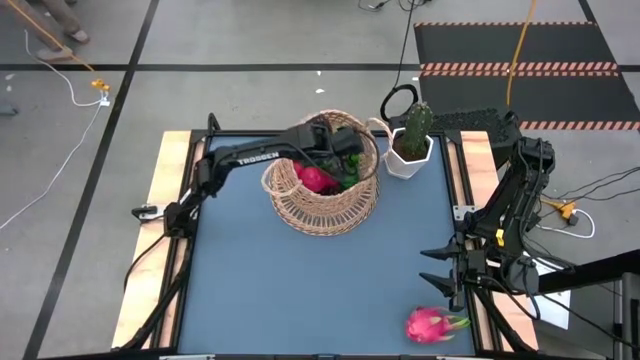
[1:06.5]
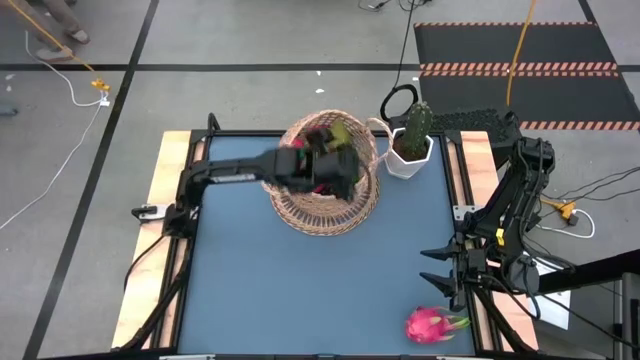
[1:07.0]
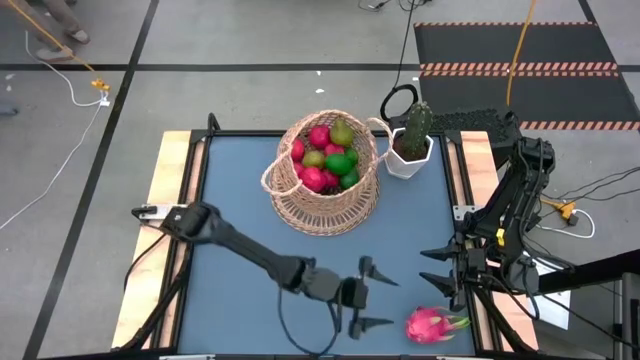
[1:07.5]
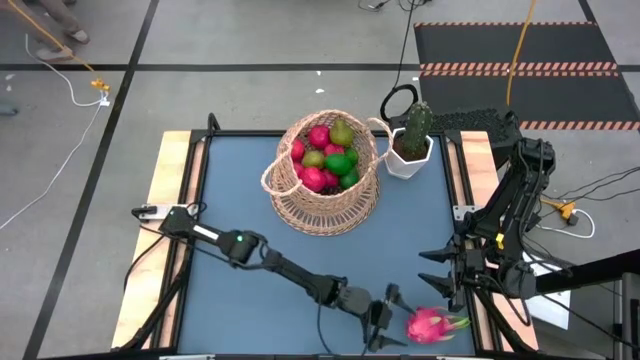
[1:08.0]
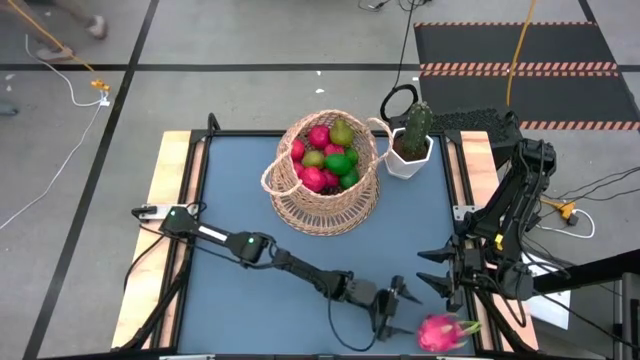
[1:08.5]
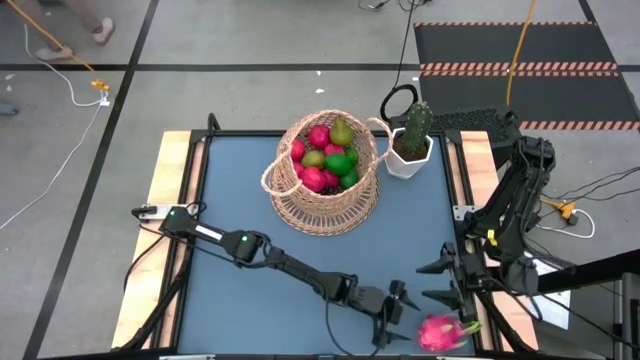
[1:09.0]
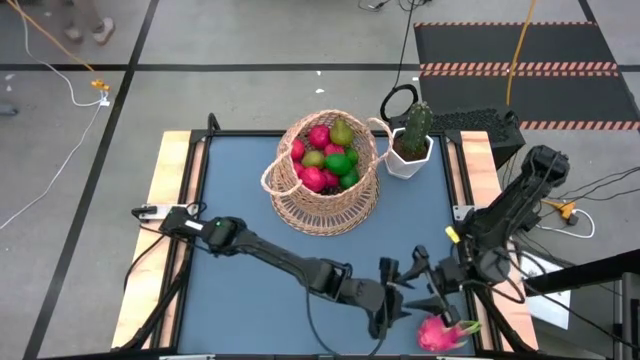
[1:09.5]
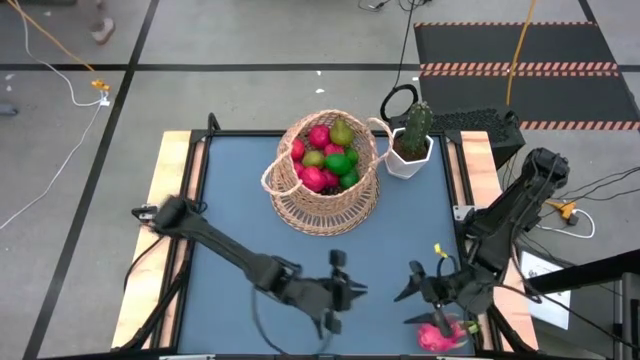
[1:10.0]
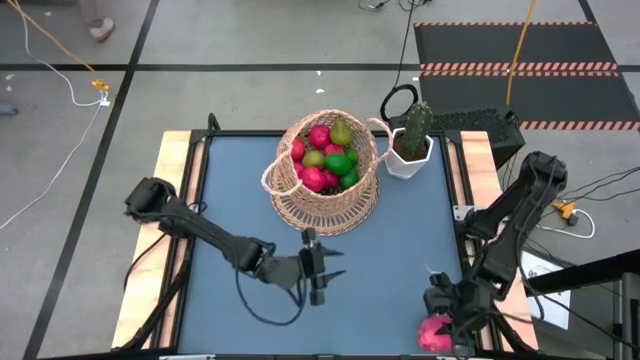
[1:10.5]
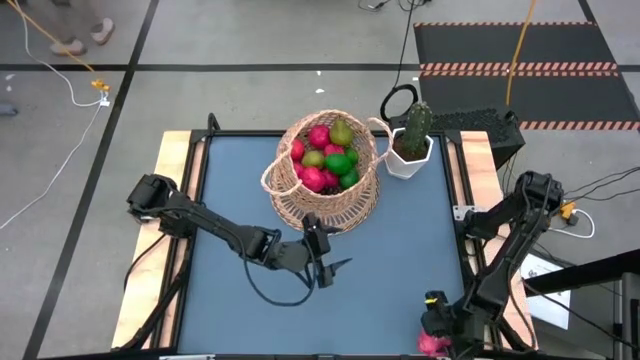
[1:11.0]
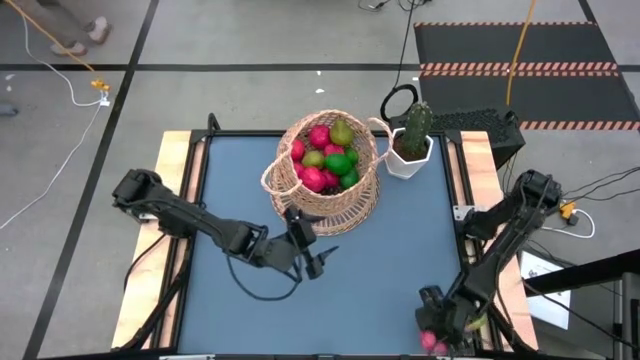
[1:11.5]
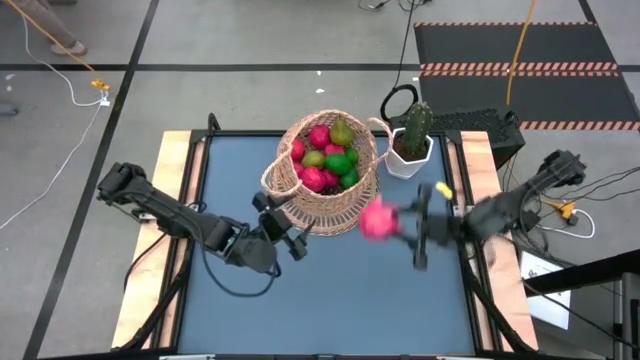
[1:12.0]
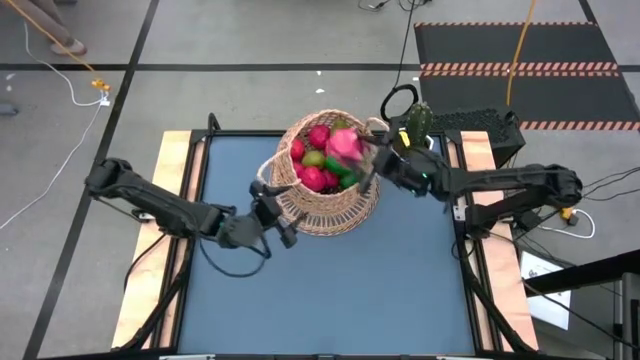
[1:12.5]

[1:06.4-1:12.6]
Task: Build produce basket
Put the pink dragon fruit into the brown basket

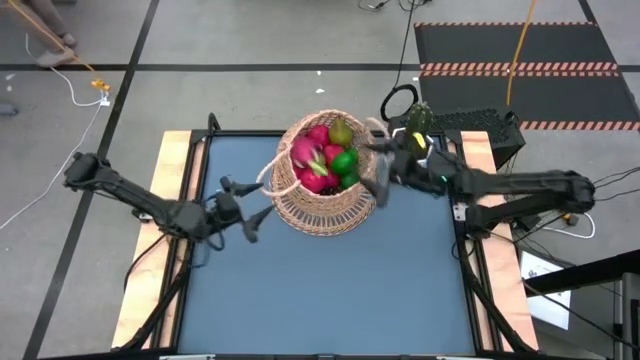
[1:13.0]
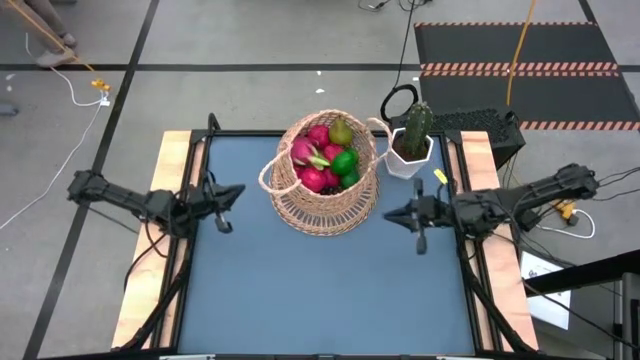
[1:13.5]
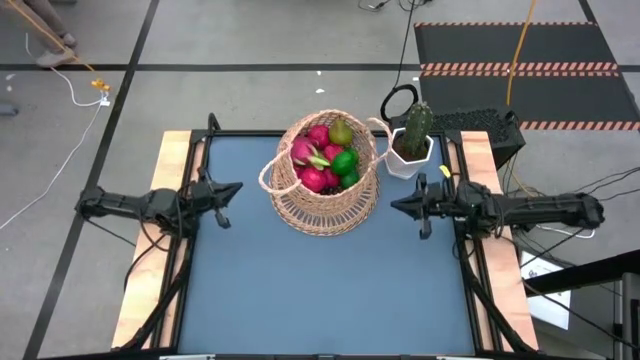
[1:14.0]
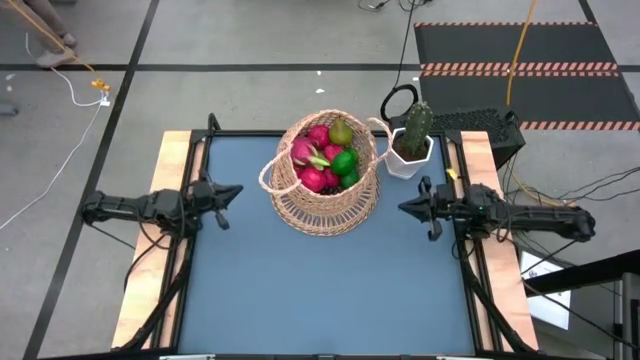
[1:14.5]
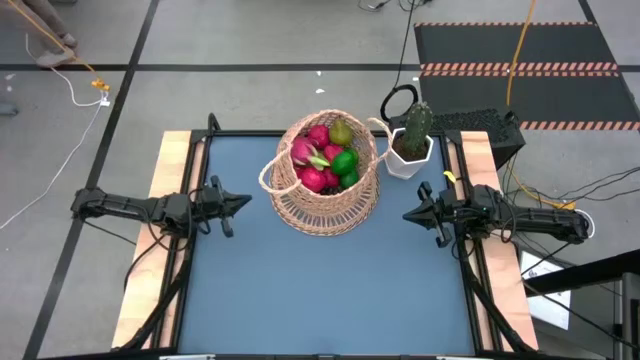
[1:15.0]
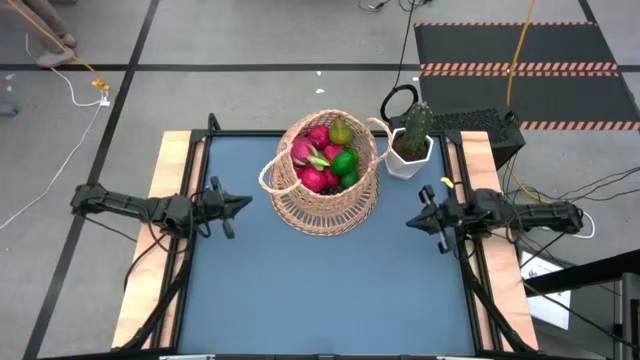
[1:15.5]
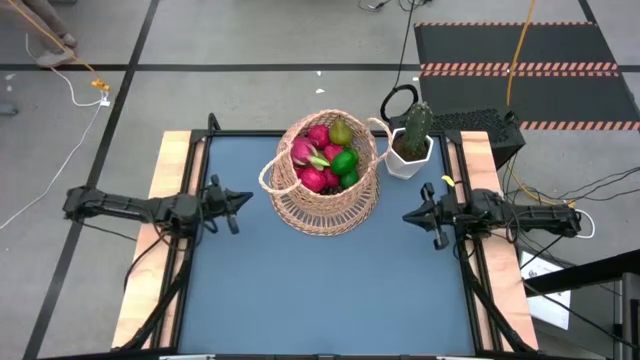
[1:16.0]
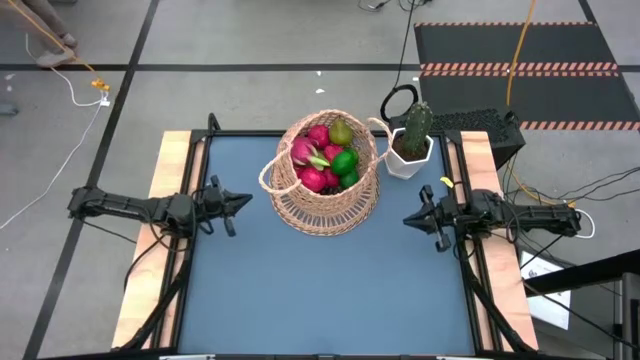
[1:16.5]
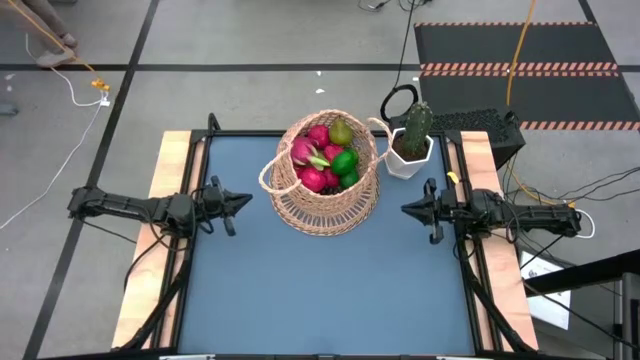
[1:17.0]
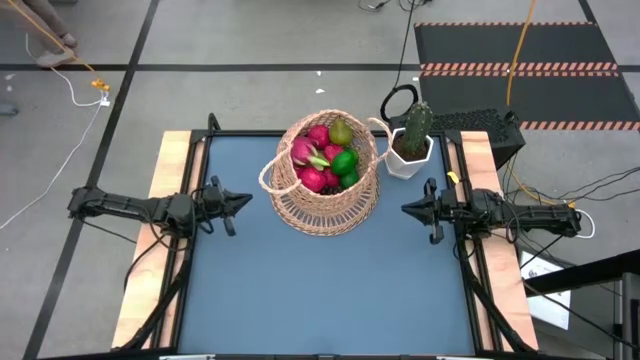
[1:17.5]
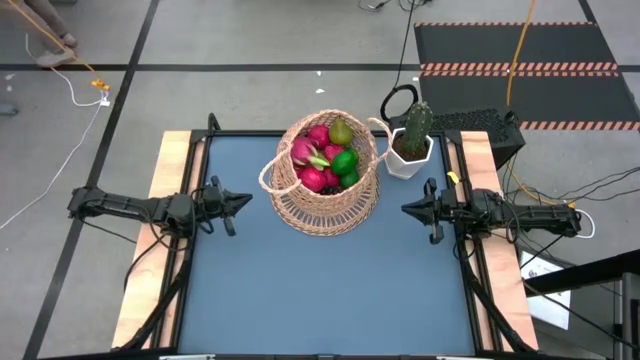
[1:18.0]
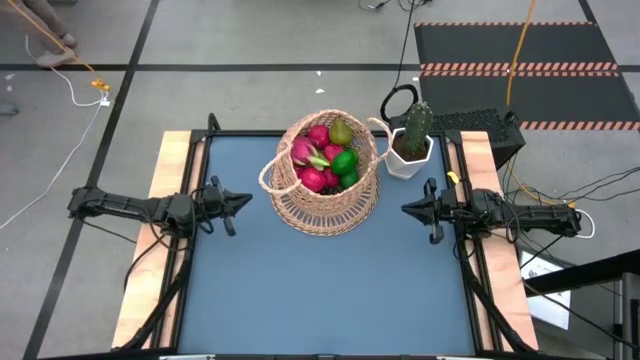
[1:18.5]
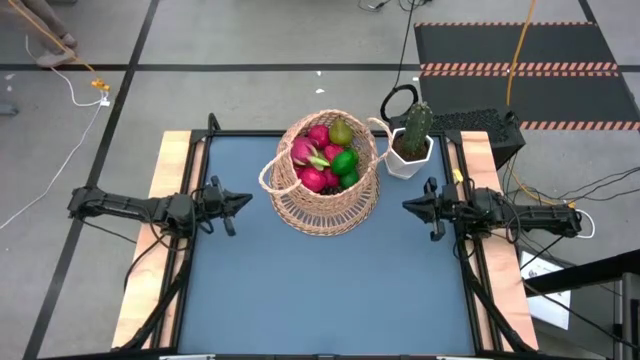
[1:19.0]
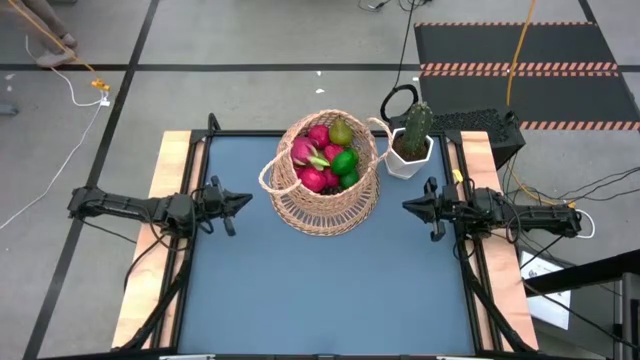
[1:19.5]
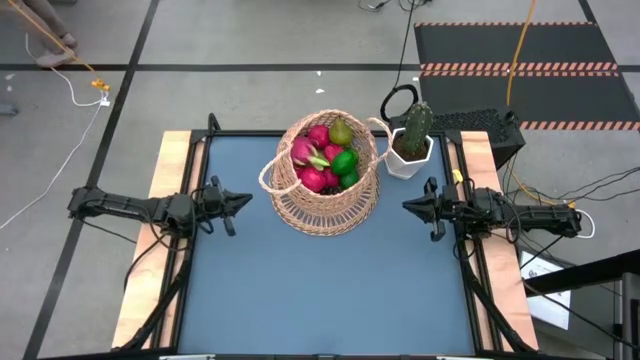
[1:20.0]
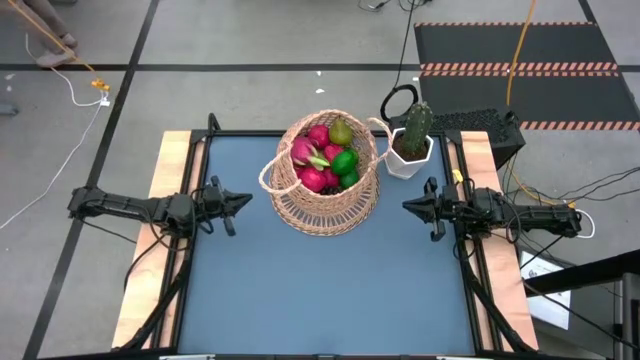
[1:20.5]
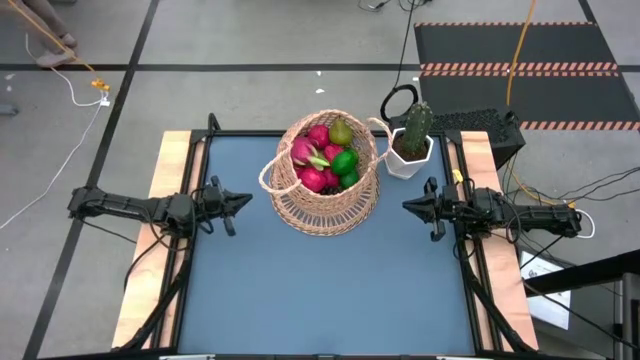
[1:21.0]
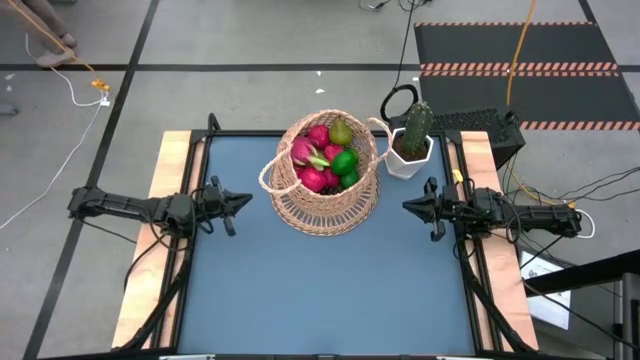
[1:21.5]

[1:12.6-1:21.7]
Return to Home Position

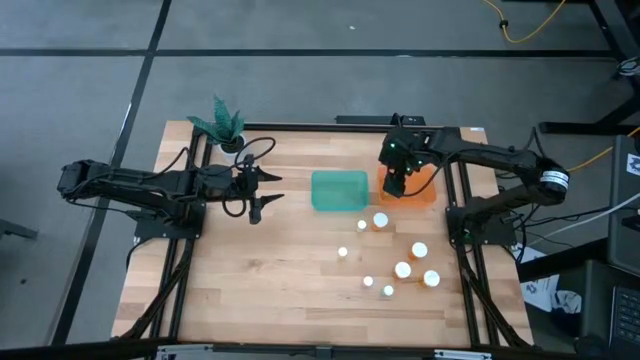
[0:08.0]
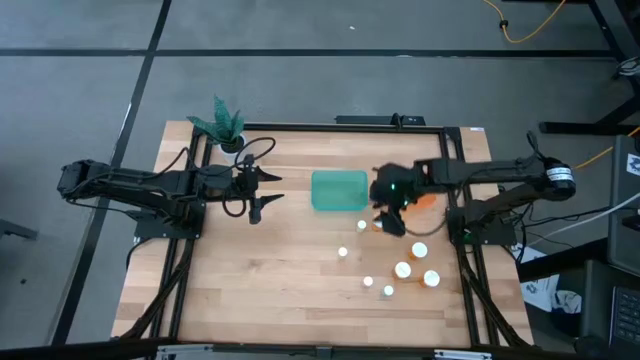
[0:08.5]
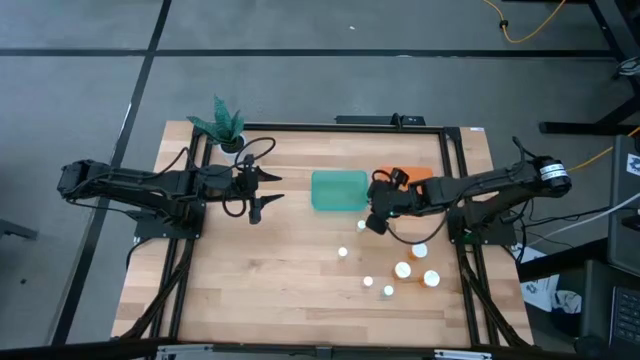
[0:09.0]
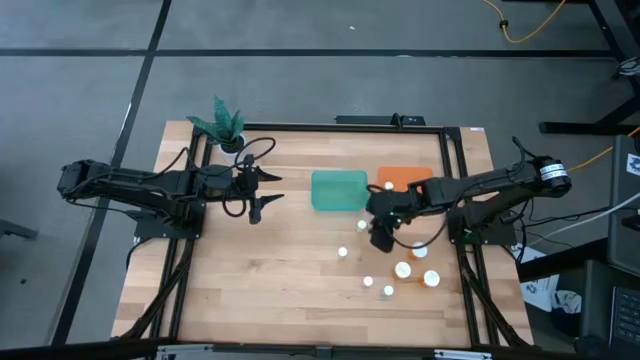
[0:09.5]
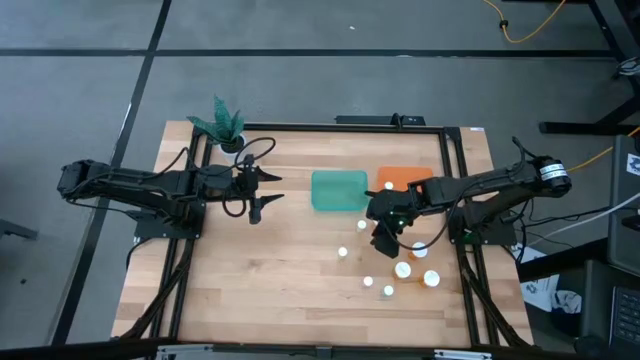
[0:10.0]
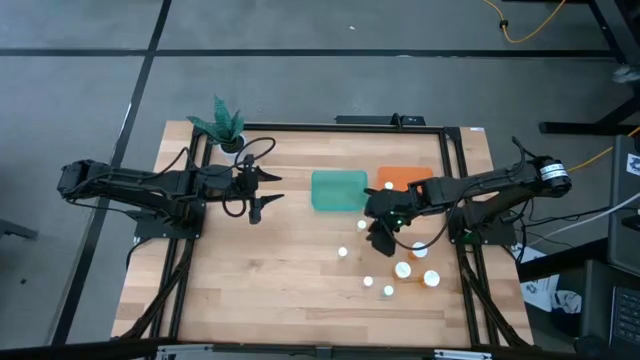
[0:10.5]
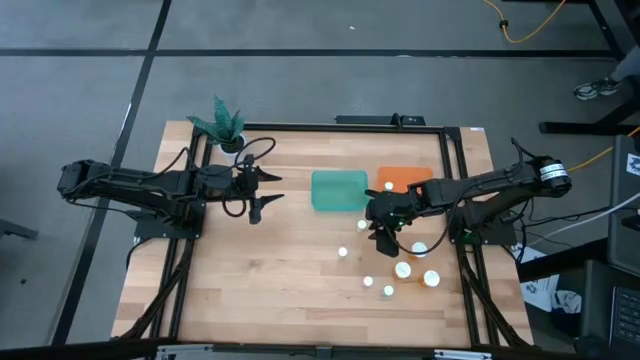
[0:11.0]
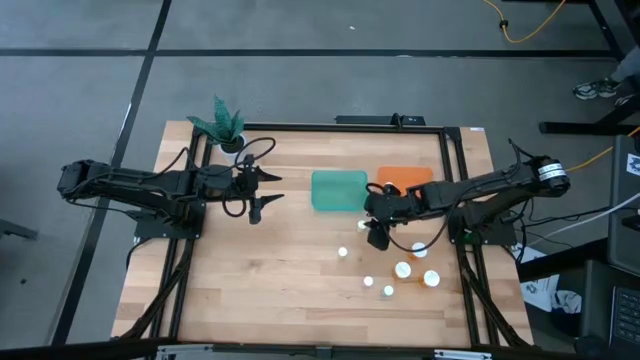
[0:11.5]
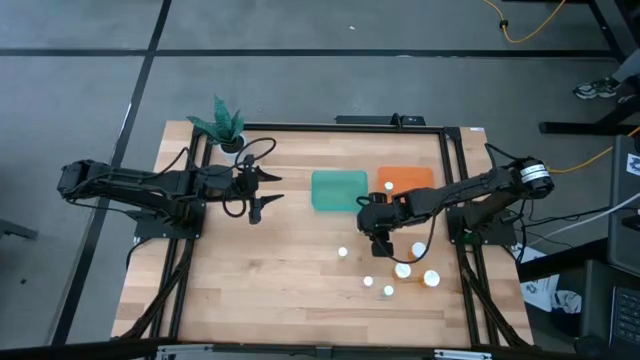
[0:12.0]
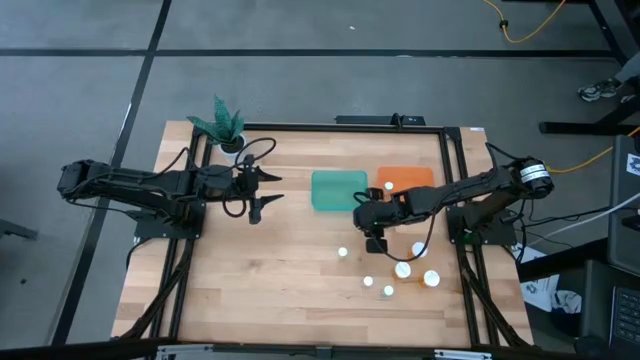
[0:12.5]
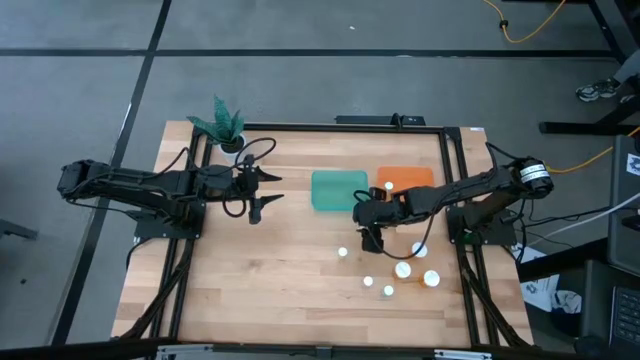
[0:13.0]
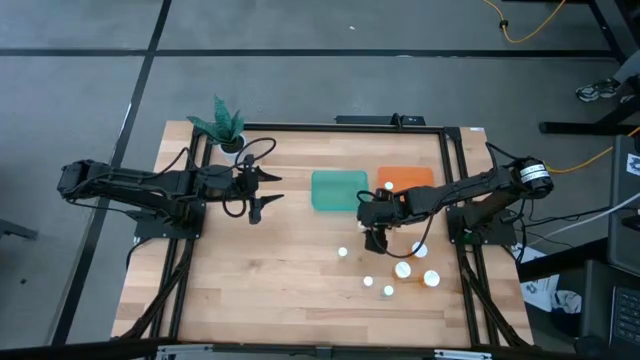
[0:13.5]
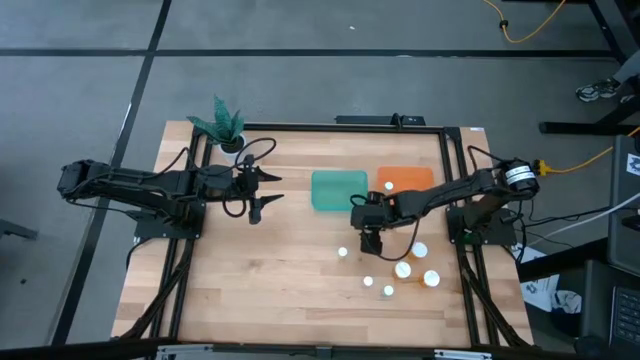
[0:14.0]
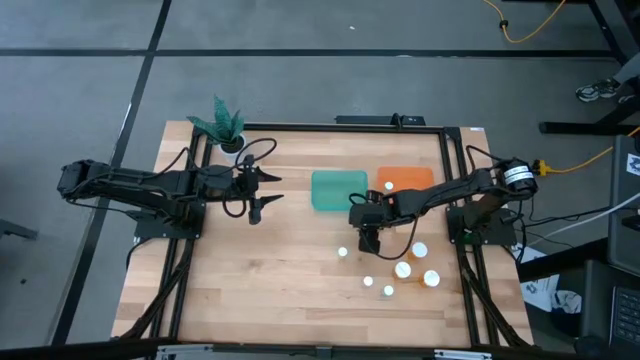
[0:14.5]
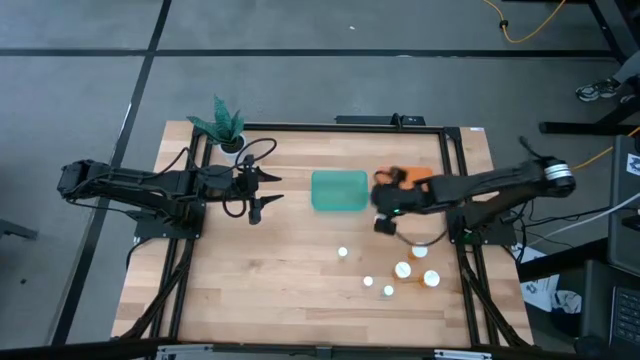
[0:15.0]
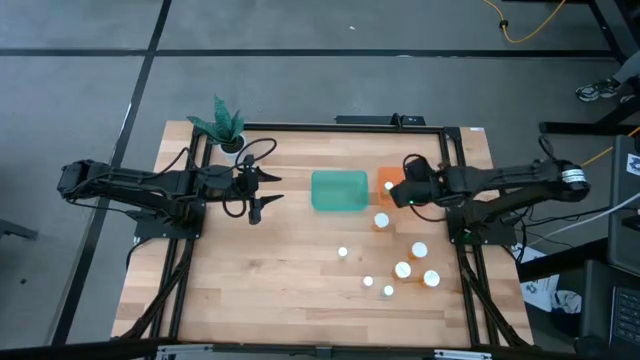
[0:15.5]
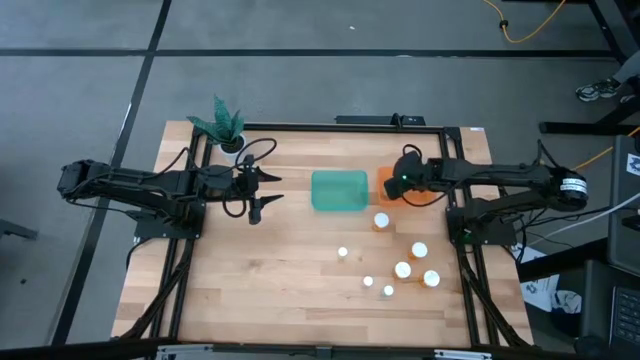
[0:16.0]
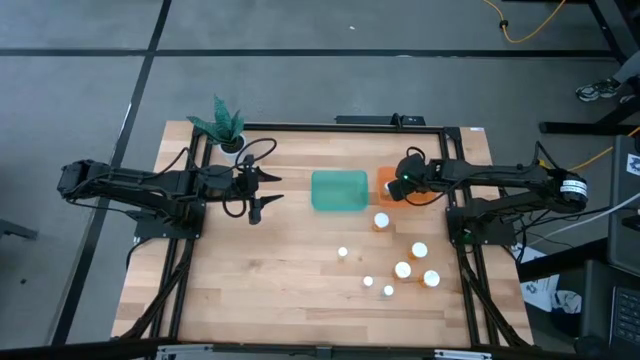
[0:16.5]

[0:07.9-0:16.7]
Task: Pick and place medicine bottles into bin by pill shape (circle, oval)
Put the yellow pill bottle into the orange bin
